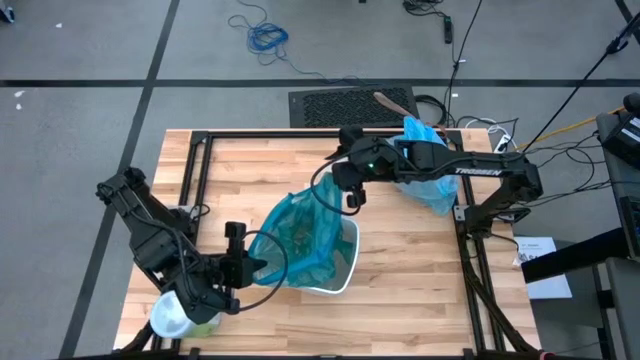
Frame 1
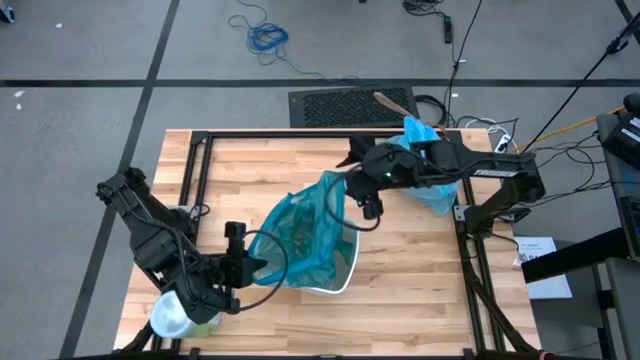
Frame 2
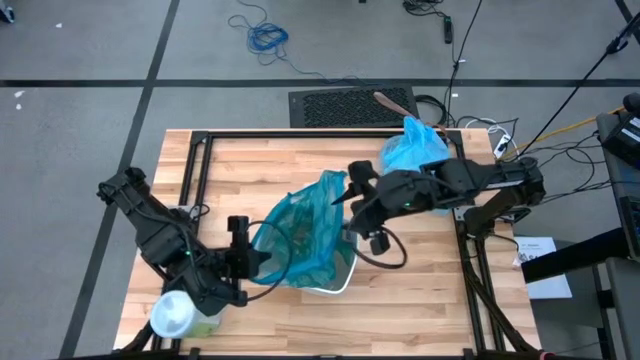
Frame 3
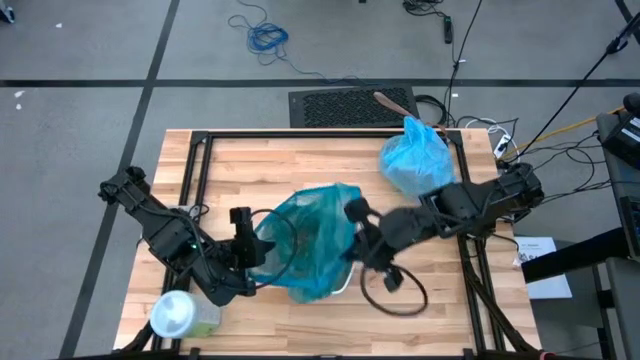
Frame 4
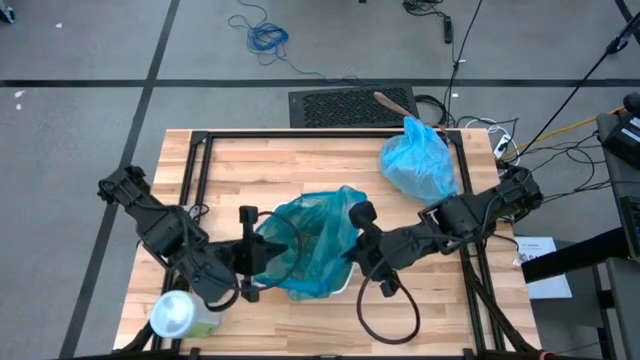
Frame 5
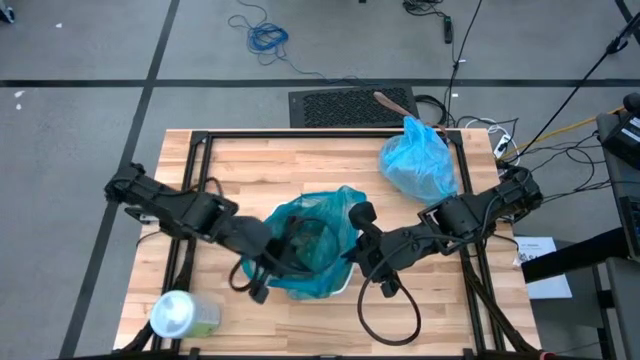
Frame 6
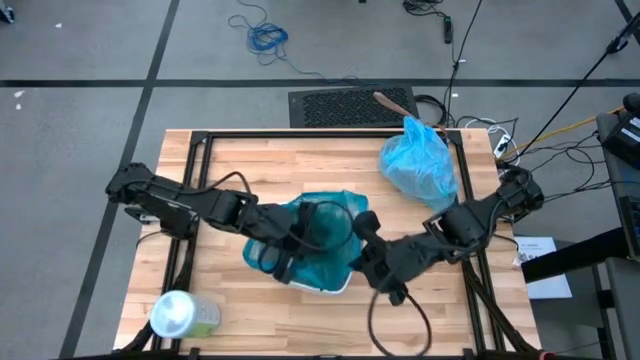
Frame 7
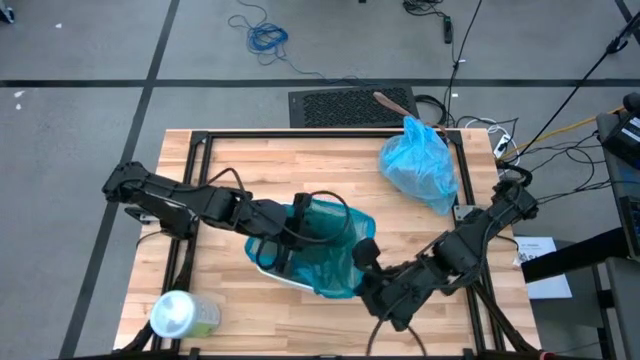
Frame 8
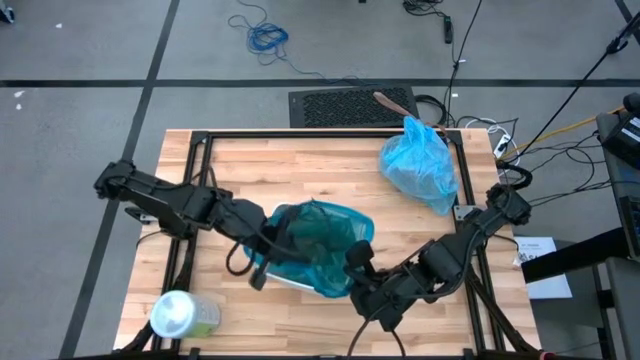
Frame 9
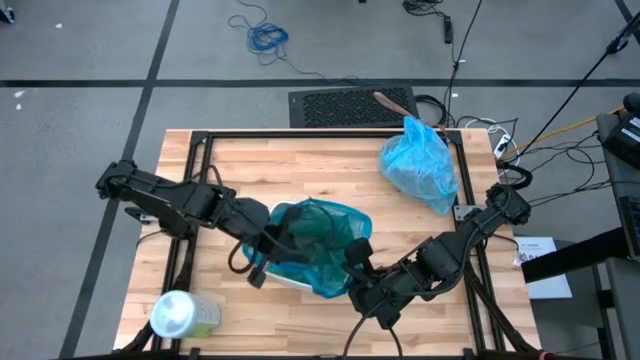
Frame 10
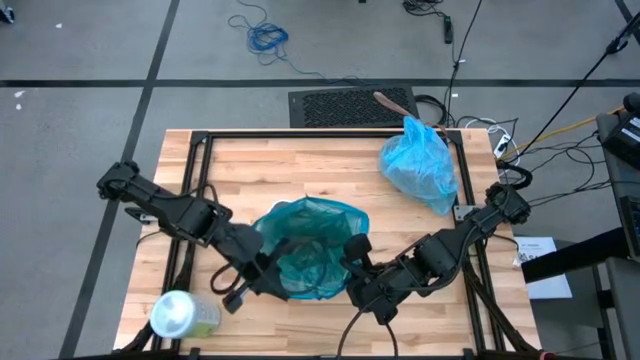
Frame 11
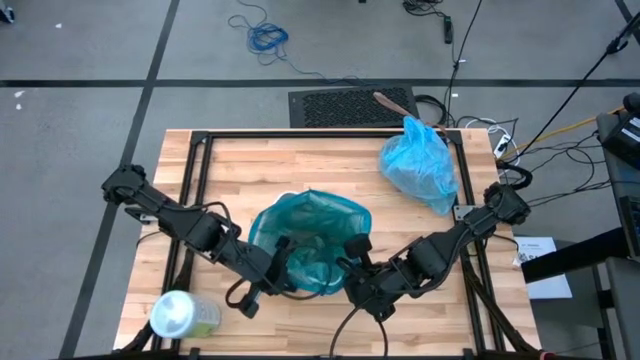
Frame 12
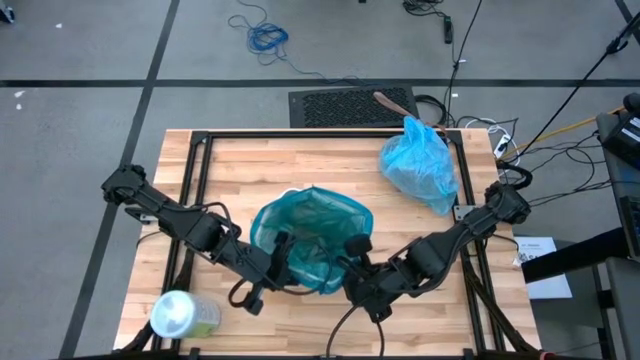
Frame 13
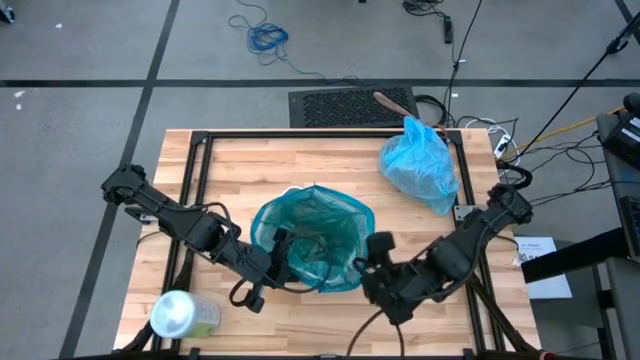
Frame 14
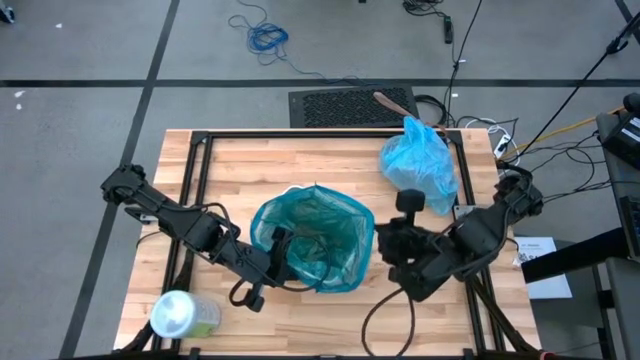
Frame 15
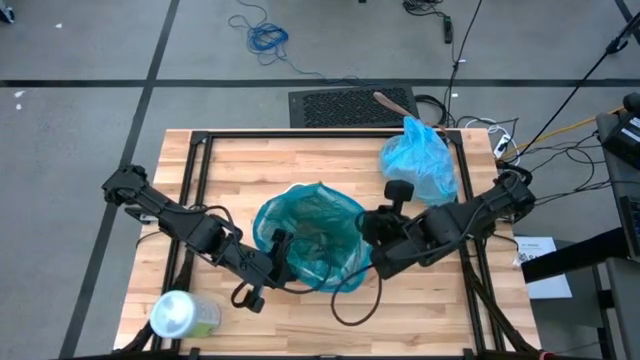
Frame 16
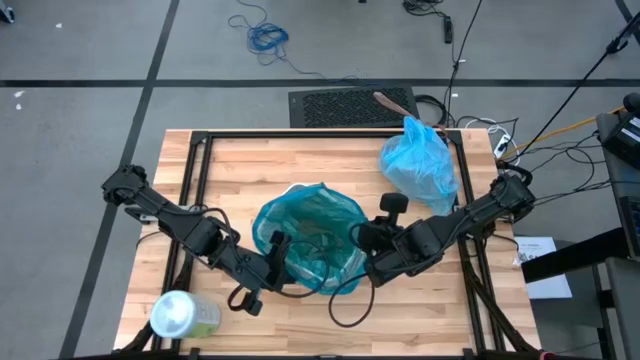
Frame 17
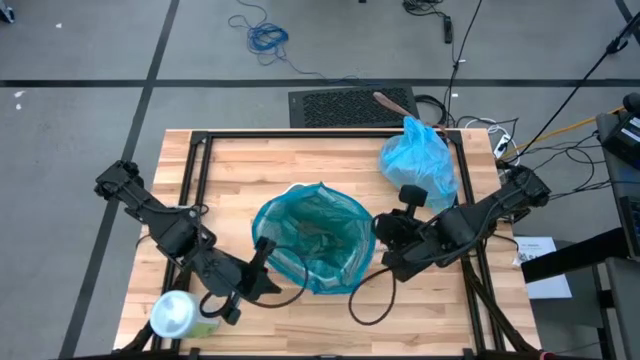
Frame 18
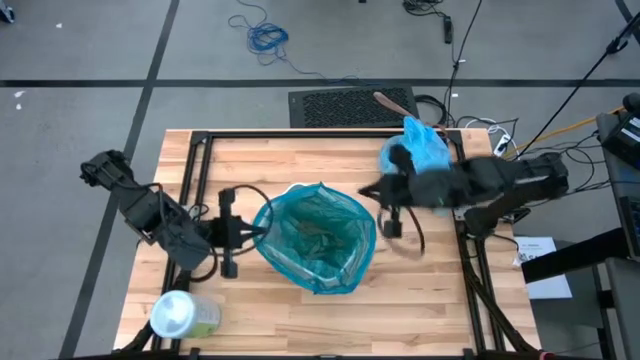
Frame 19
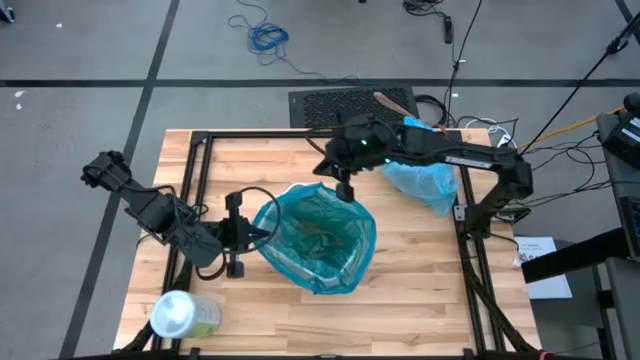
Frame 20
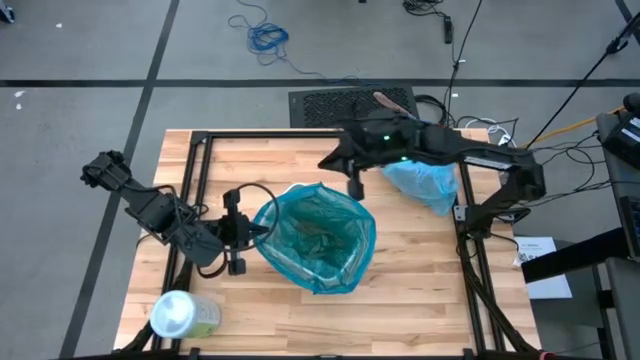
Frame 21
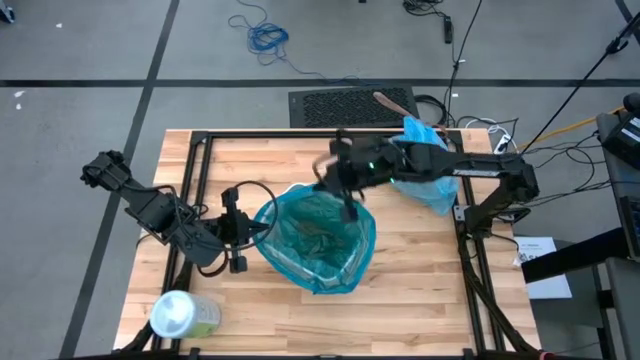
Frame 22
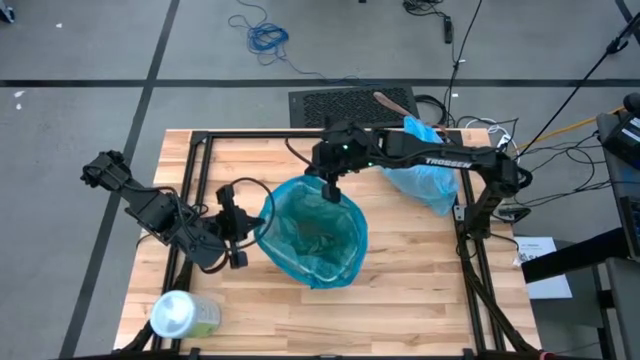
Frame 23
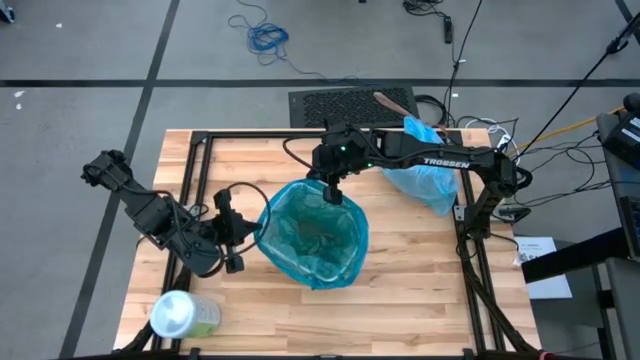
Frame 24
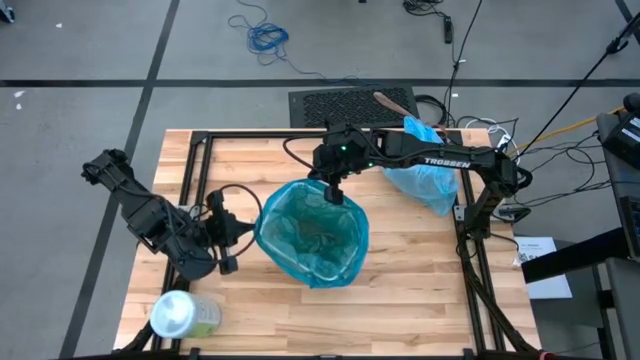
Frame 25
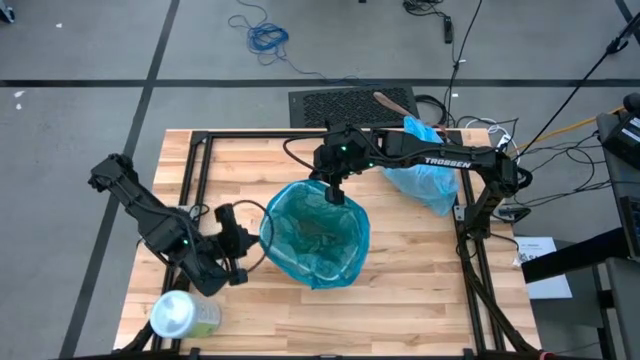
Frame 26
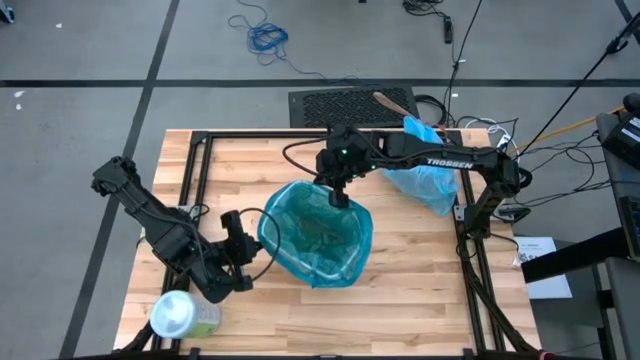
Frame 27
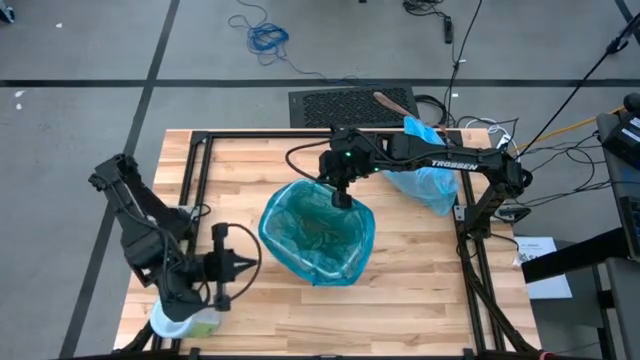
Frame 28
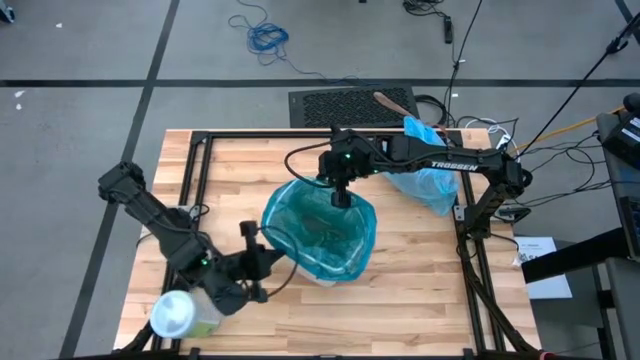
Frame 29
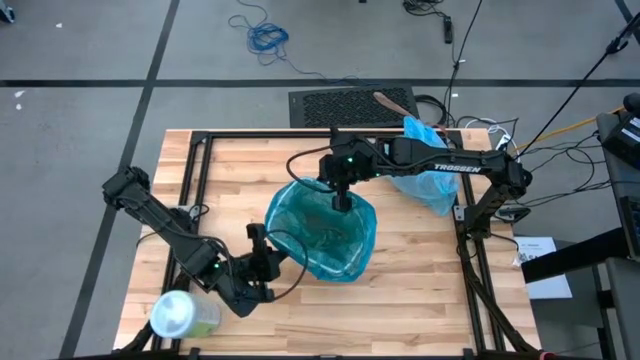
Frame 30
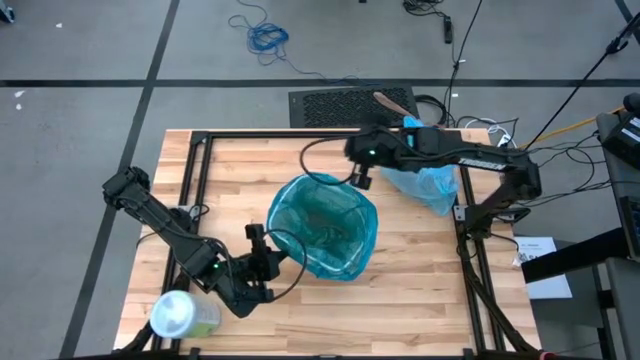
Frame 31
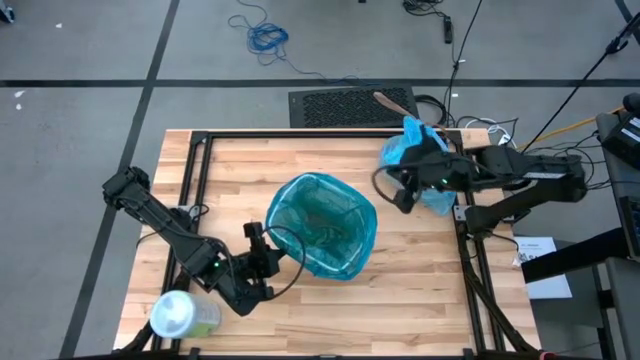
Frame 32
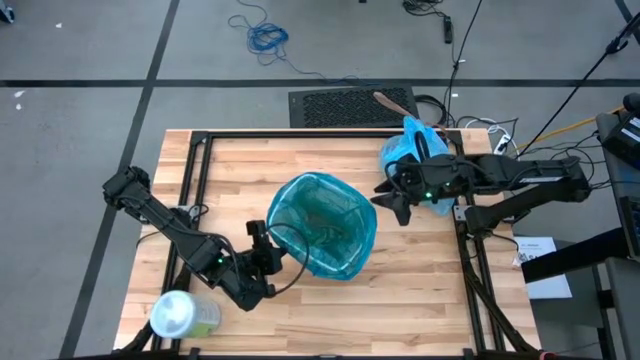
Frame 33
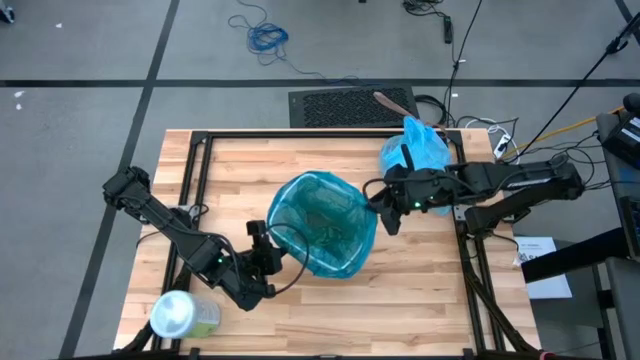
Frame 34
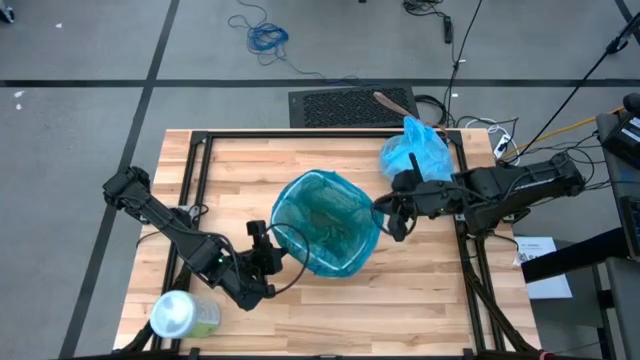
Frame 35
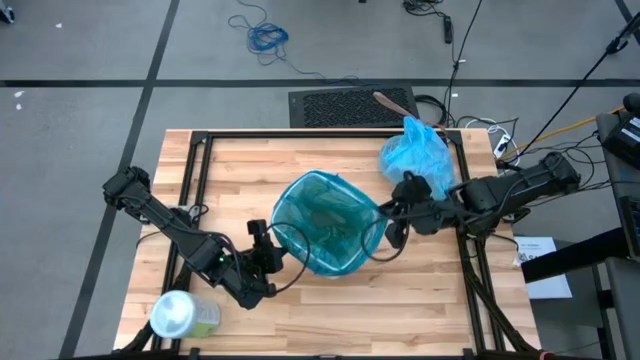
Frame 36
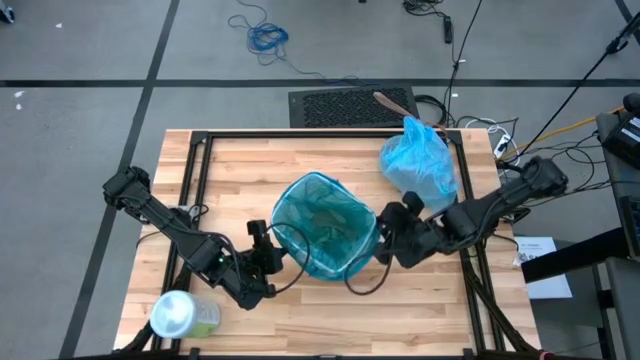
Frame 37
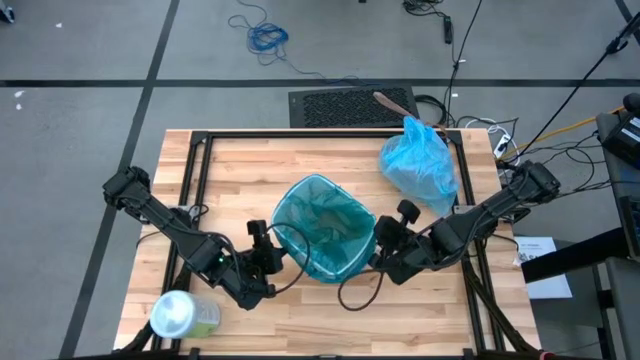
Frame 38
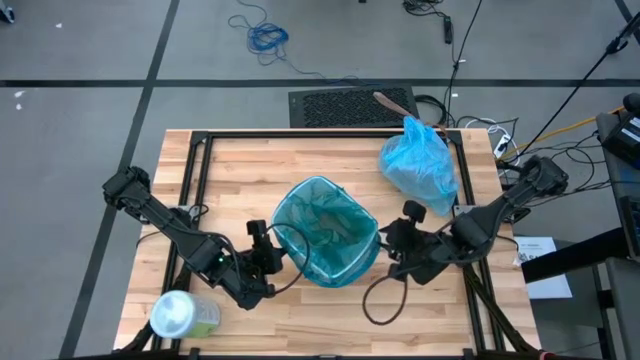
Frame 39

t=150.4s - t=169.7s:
Task: place trash/remove bag and relplace
Insert the blue trash bag into the trash bin

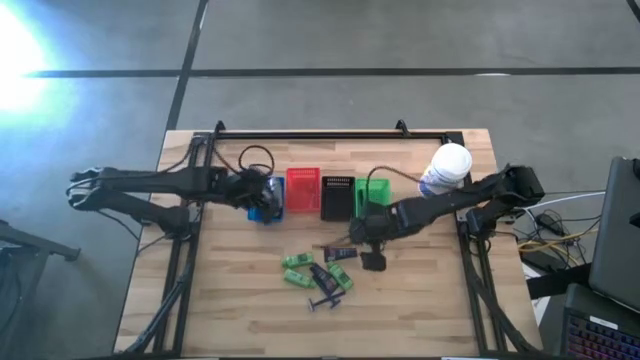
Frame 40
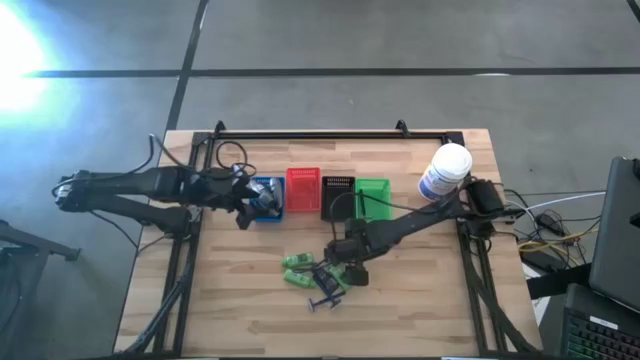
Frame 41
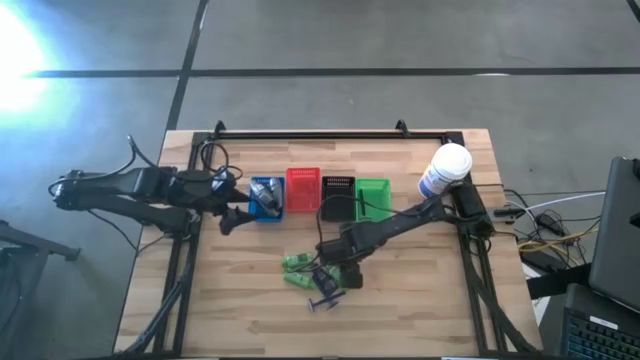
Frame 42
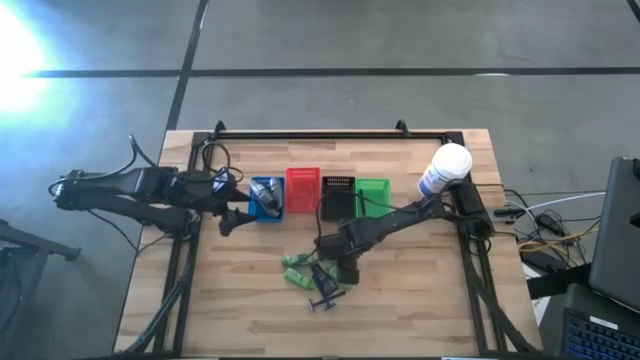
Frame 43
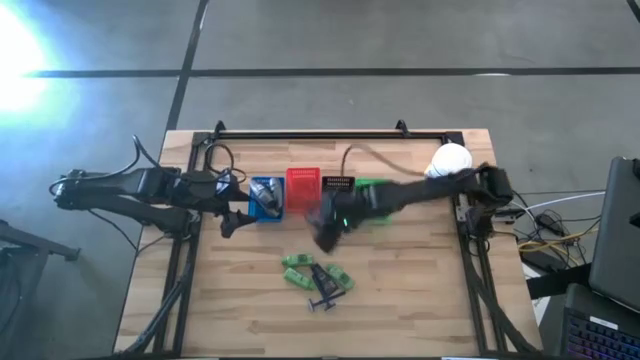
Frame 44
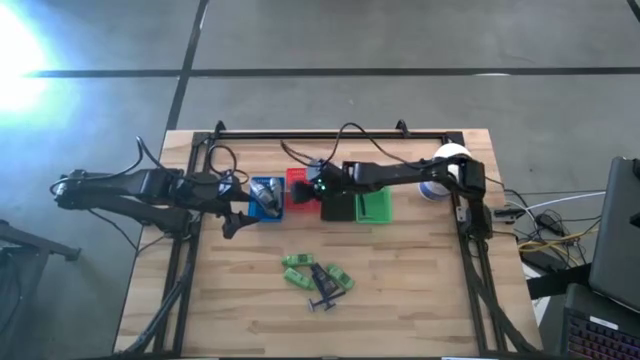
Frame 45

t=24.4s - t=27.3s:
Task: Pick & Place Travel size toiletries
Put the blue shaving cream into the red bin
